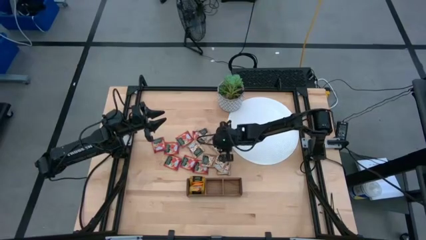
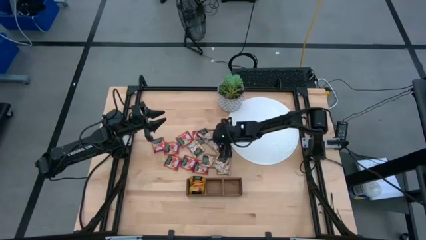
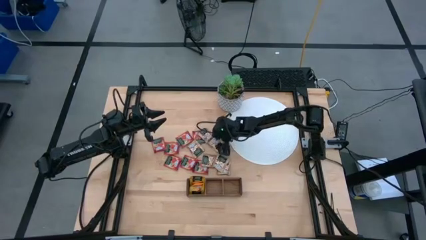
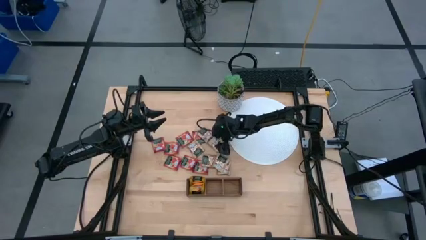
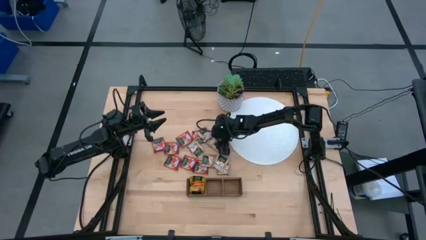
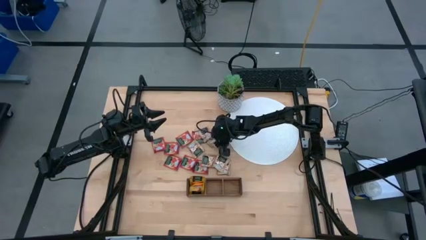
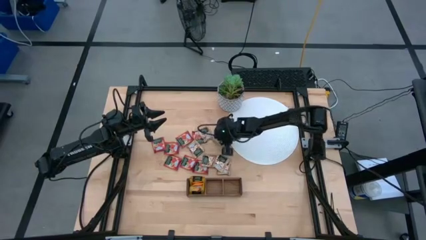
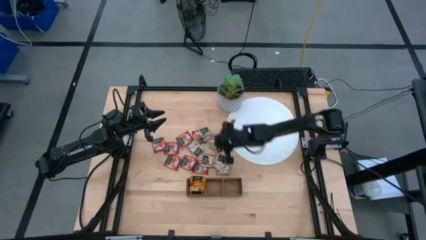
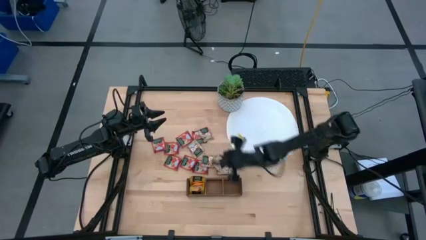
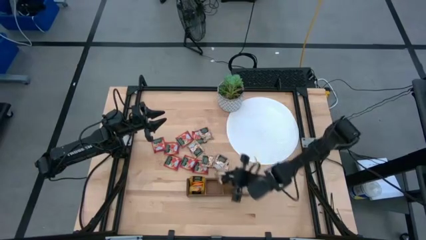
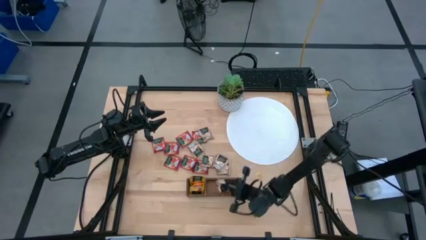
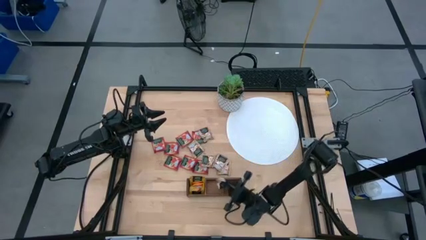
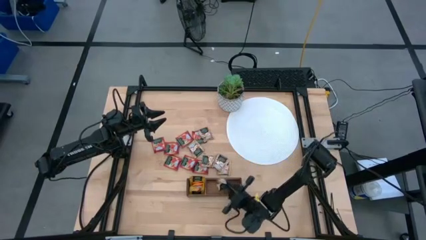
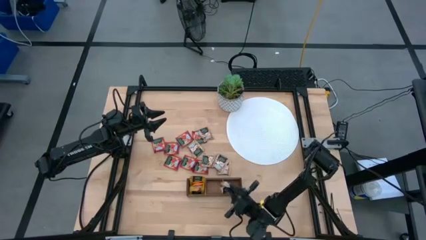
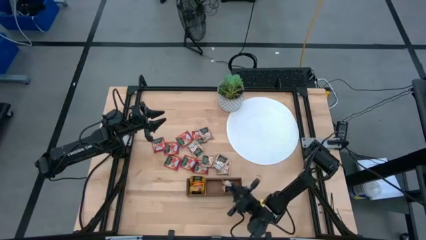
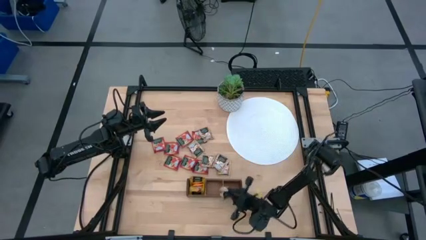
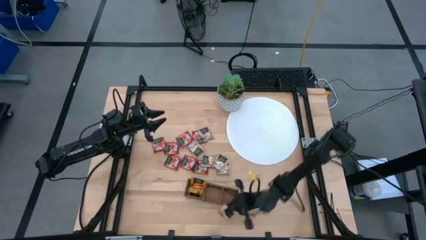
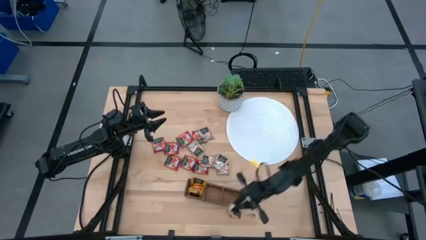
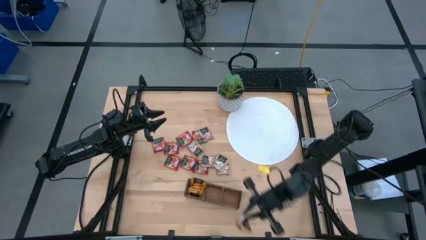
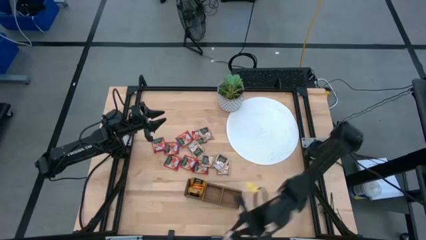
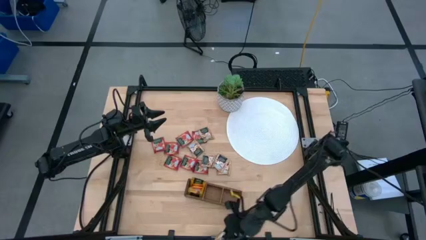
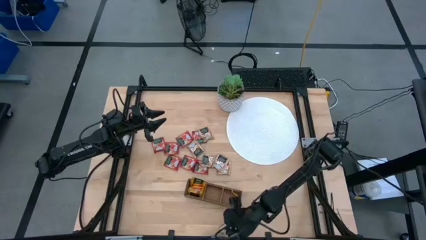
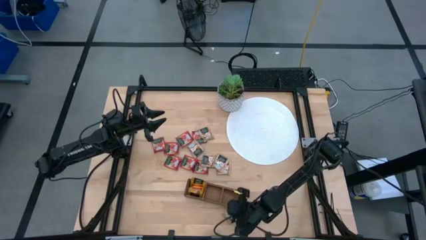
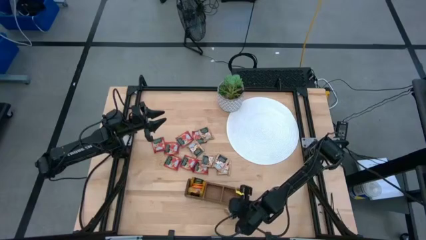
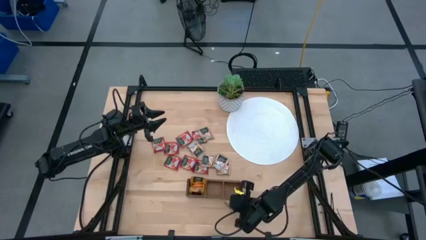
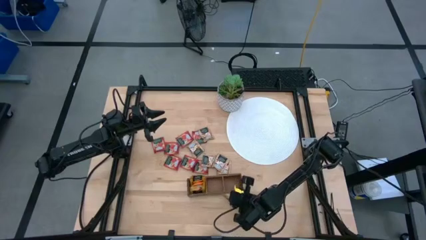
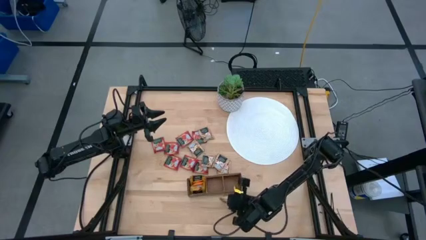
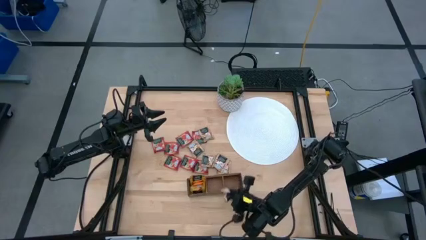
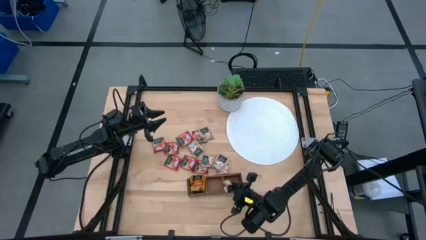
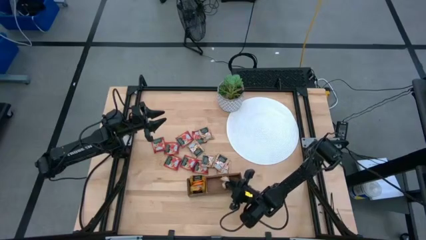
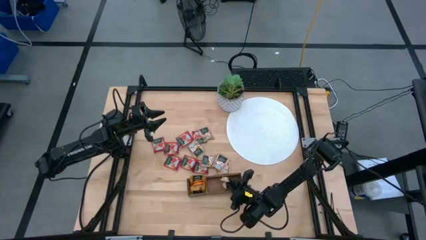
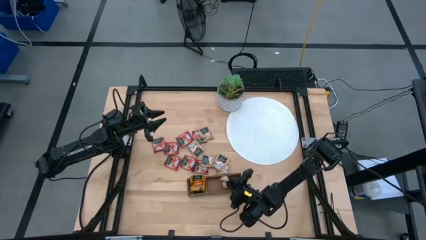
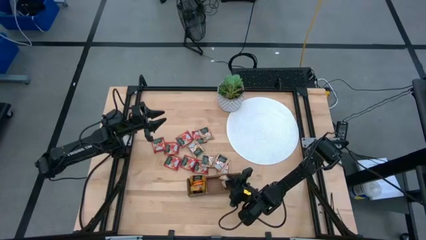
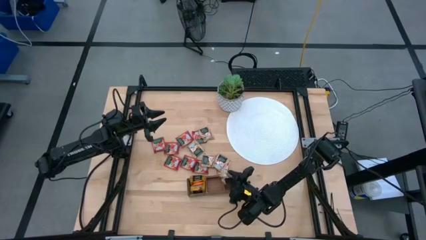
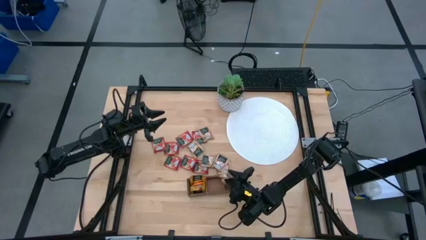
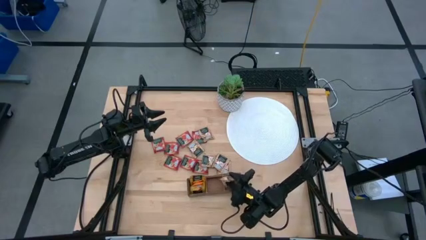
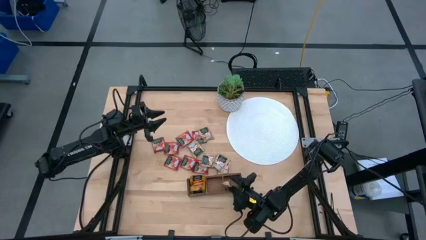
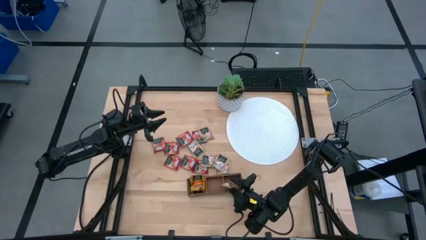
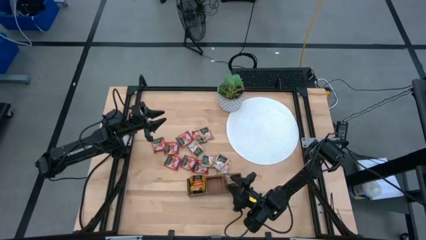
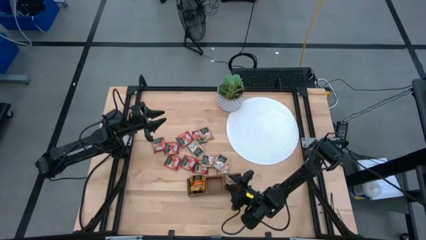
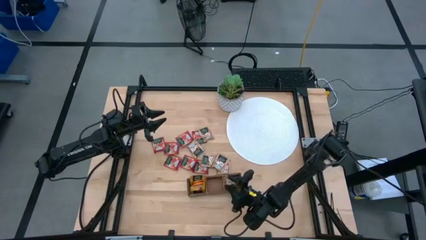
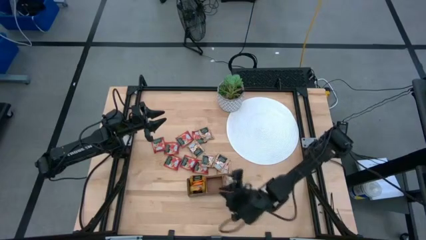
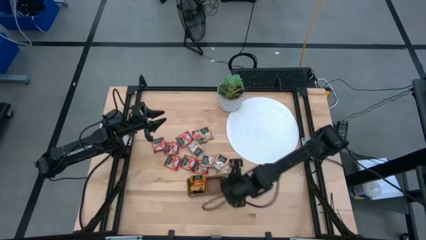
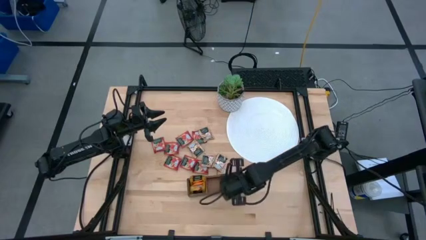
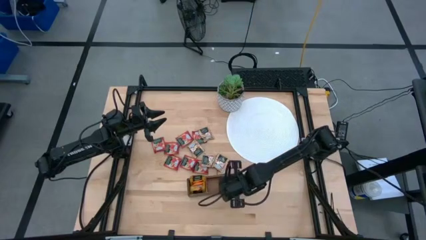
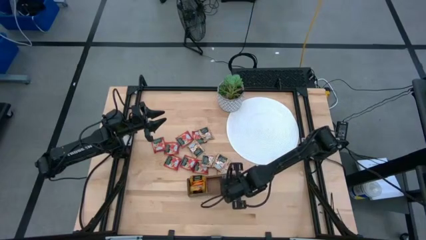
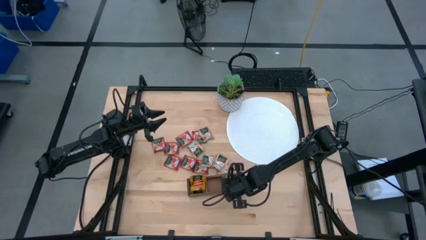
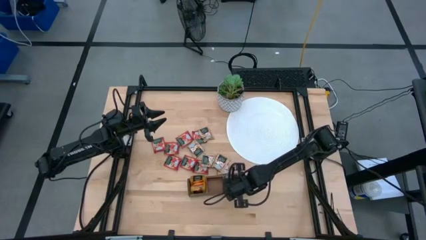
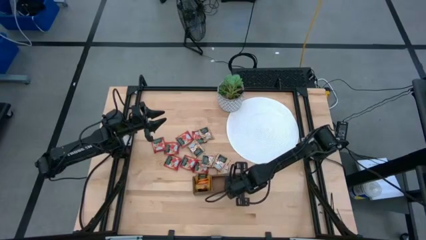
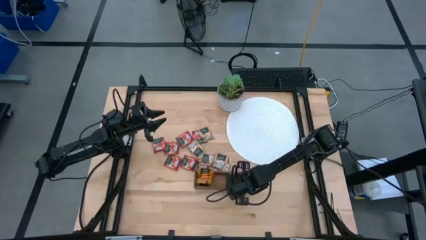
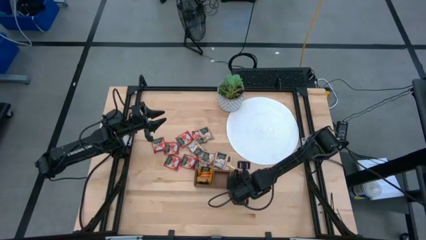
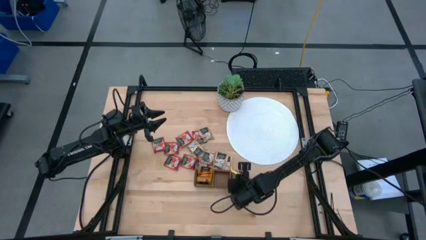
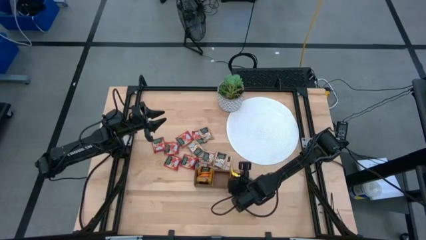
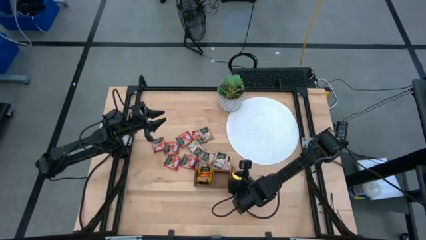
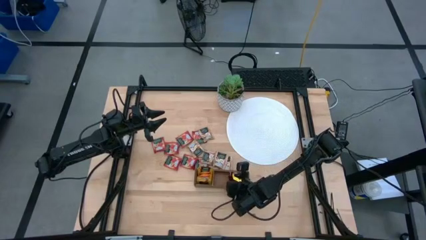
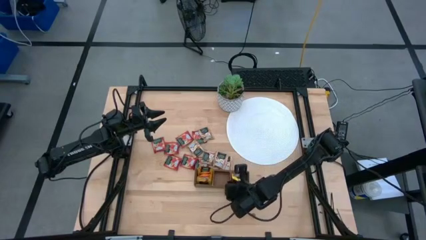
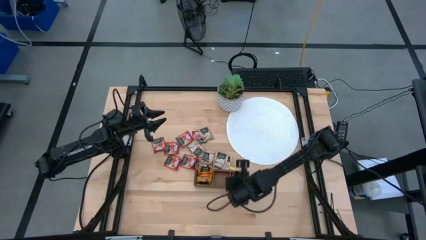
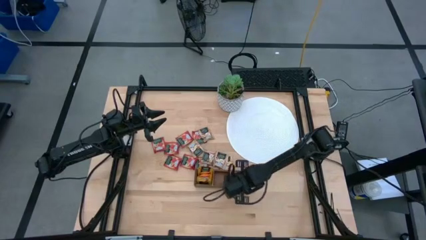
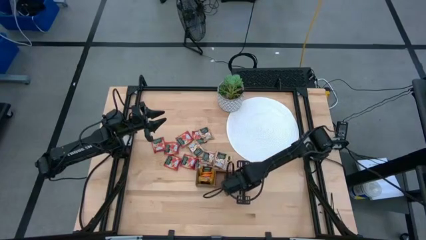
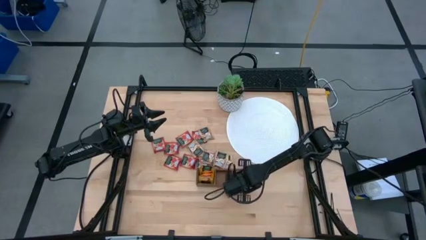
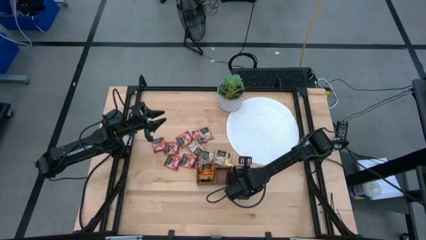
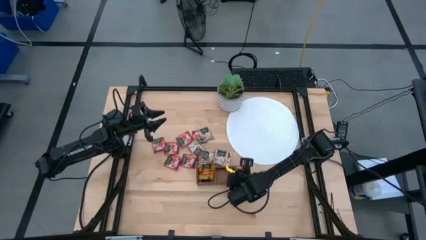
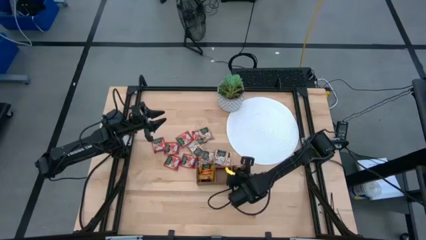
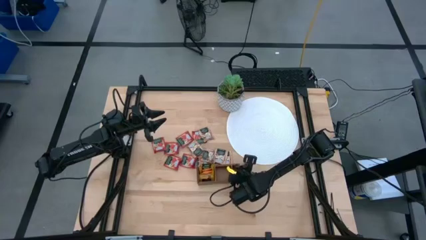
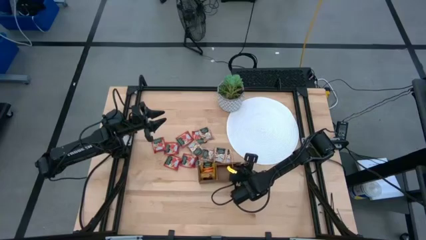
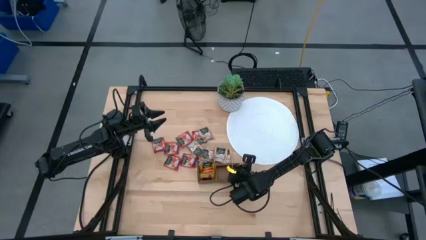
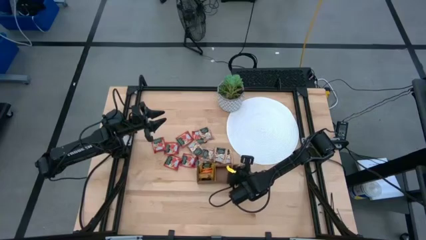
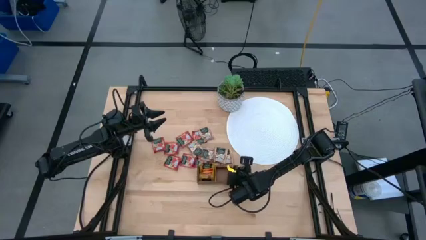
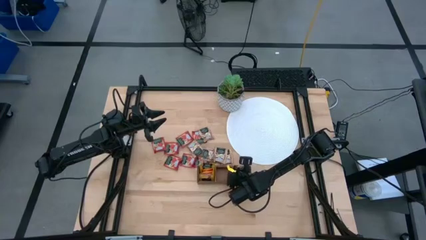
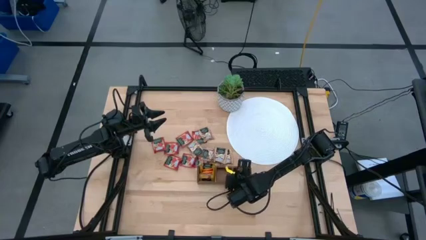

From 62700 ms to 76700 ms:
Task: Pick & Place Tea
Put the light brown tea bag into the right section of the wooden organizer

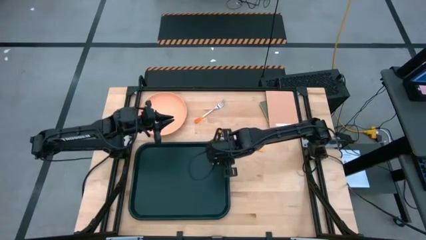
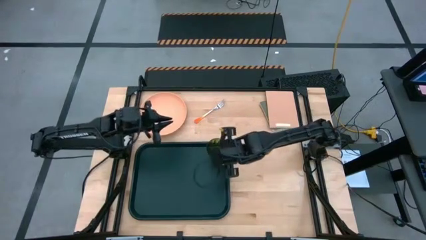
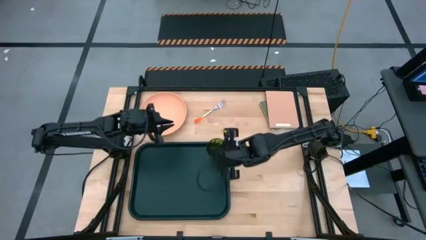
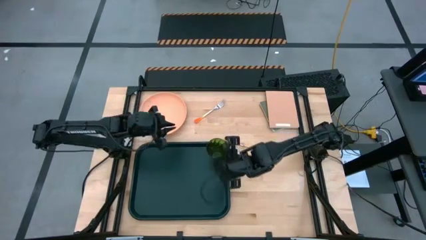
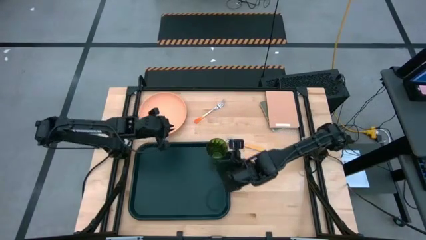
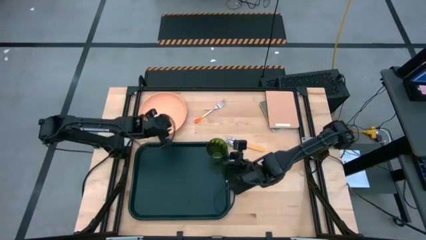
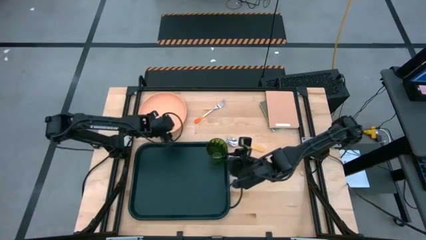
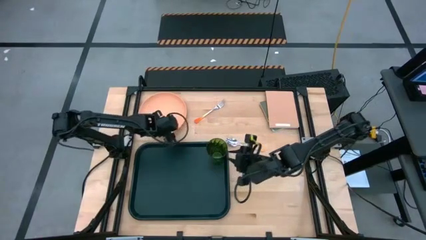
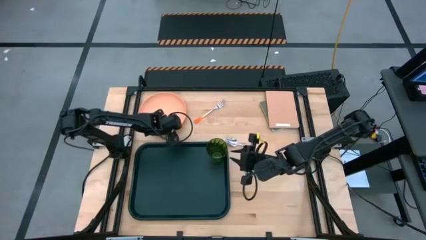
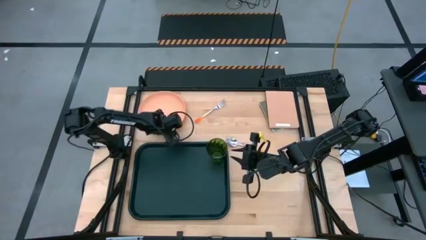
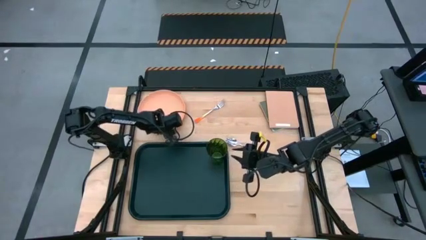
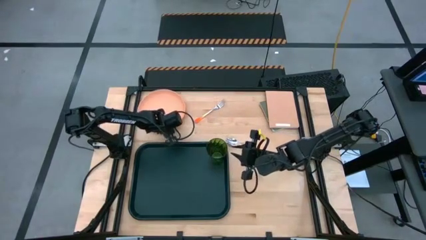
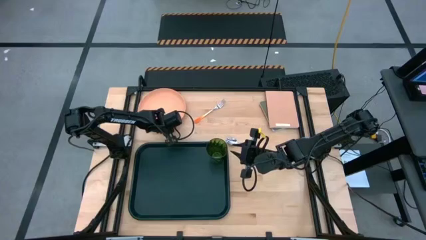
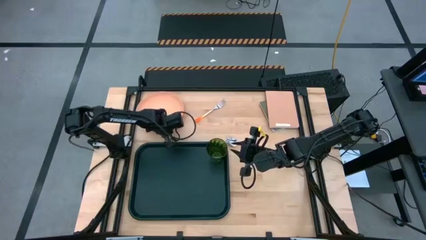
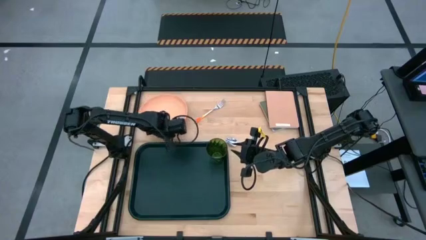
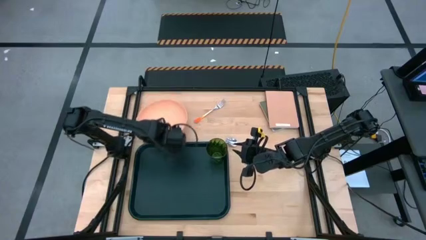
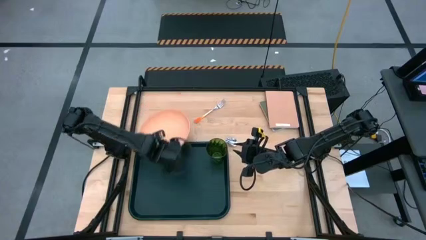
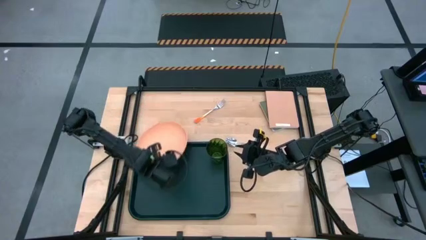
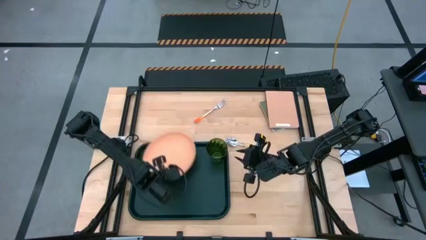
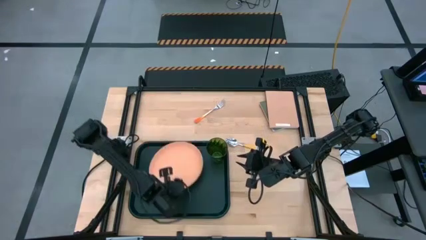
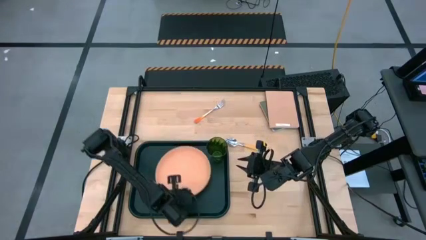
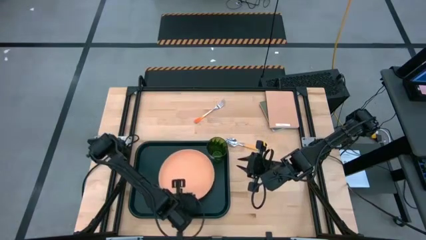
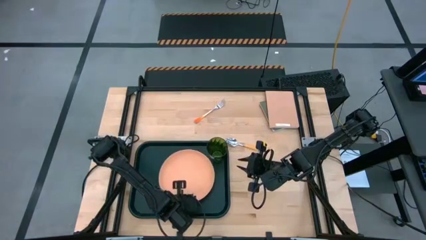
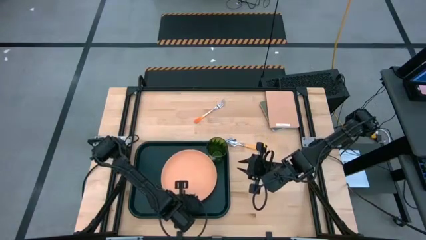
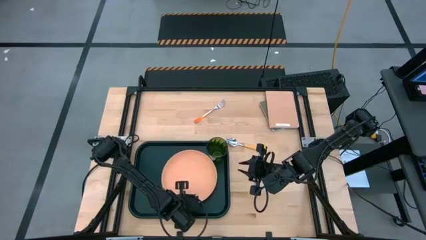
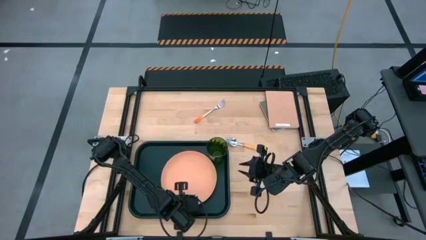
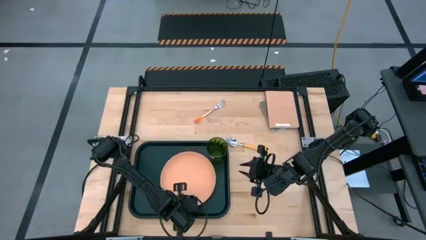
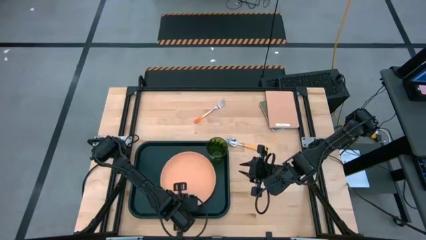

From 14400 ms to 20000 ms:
Task: Pick and place plate/cup/fork/spoon on tray
Put the light orange plate on the black serving tray
